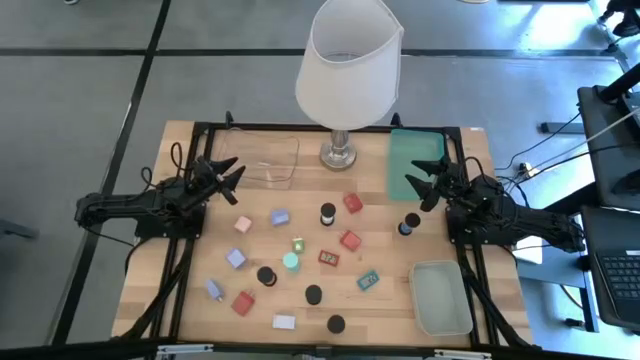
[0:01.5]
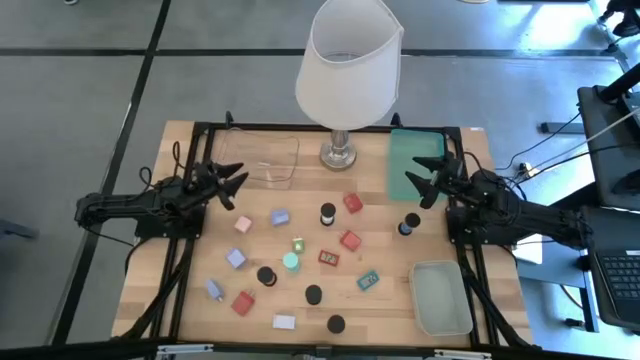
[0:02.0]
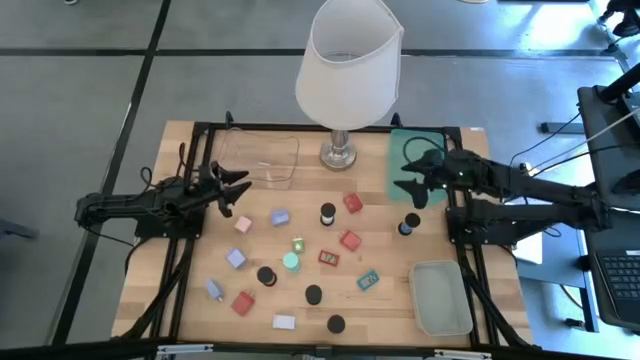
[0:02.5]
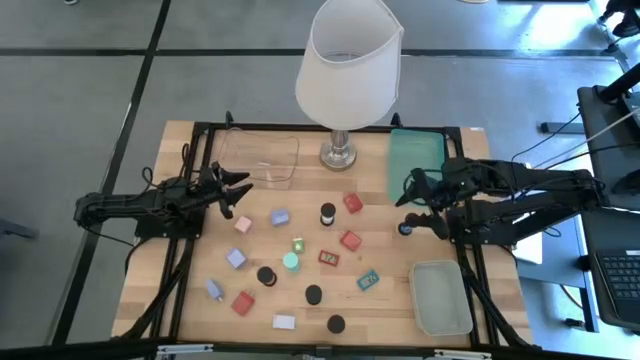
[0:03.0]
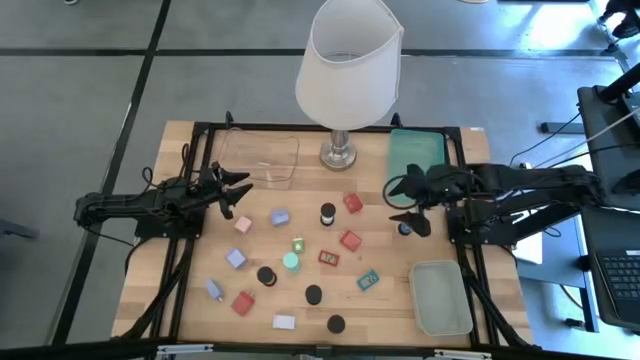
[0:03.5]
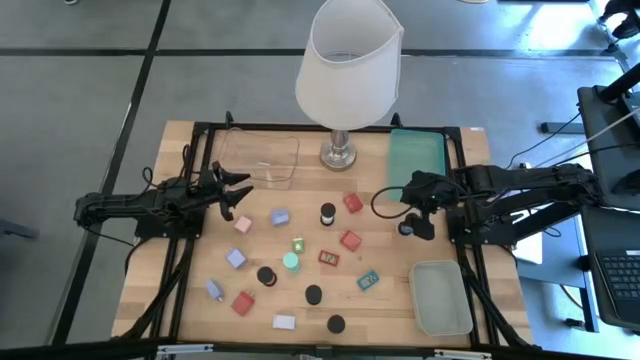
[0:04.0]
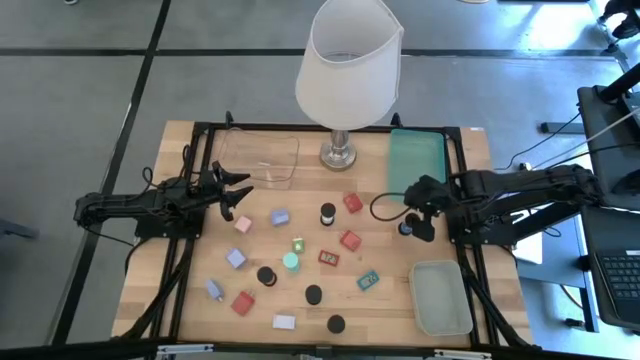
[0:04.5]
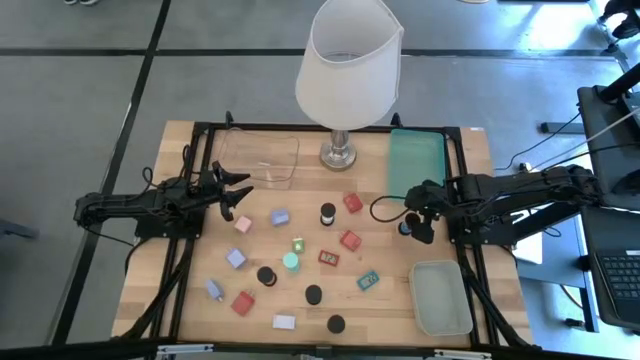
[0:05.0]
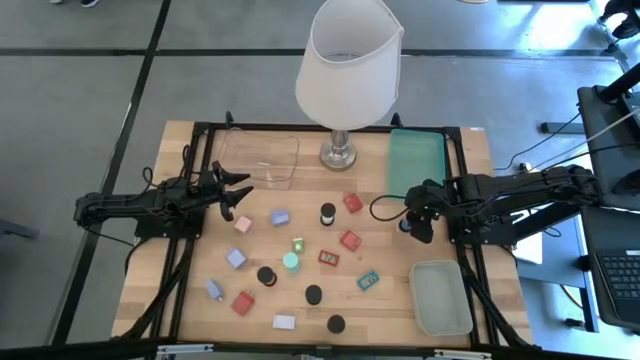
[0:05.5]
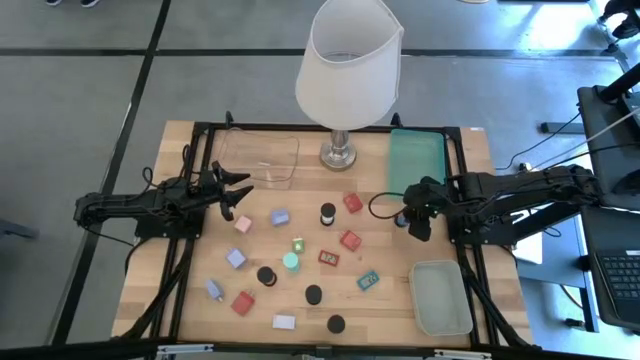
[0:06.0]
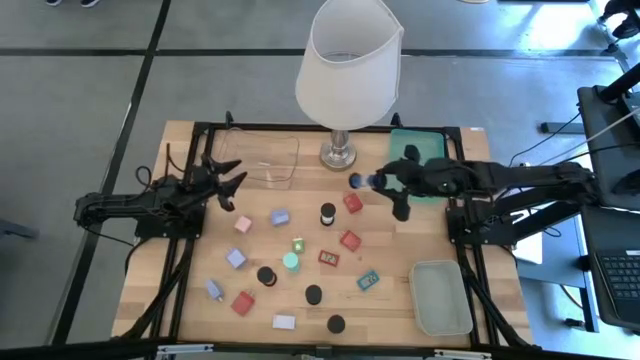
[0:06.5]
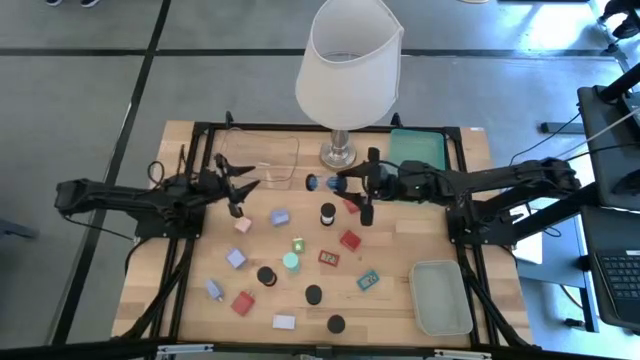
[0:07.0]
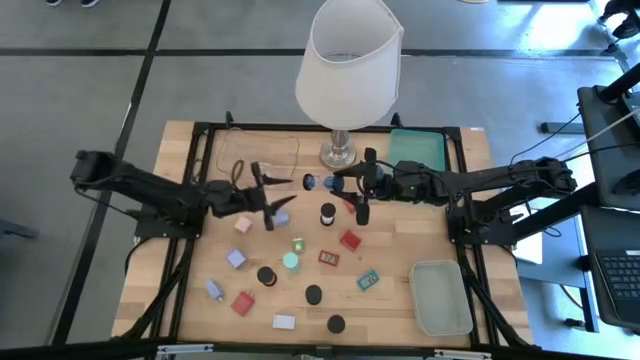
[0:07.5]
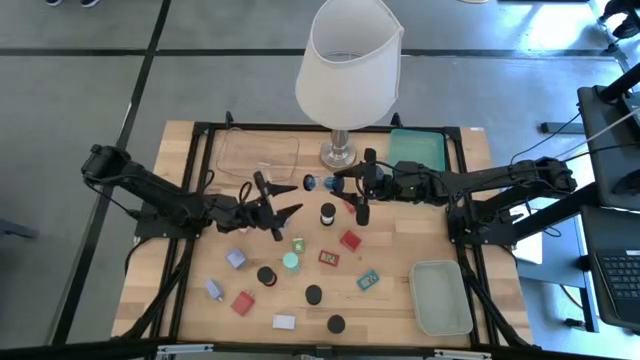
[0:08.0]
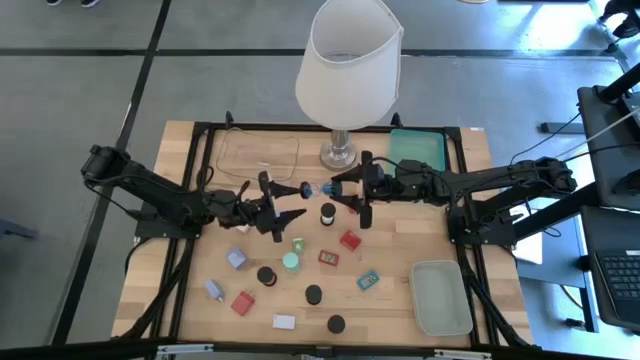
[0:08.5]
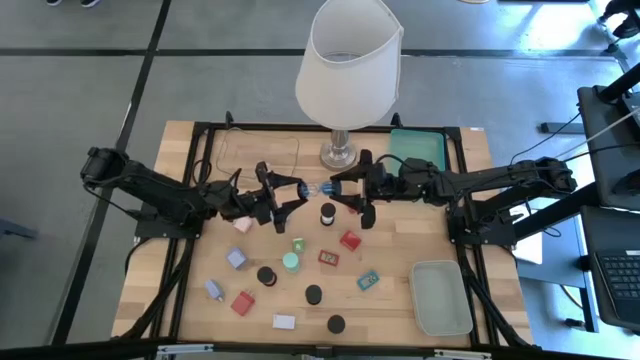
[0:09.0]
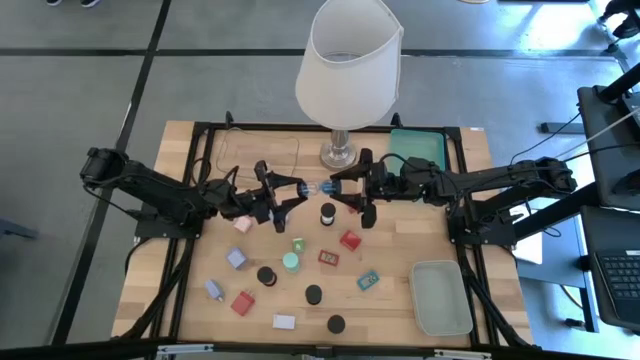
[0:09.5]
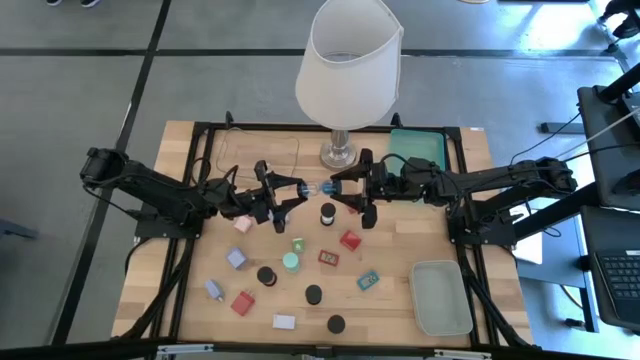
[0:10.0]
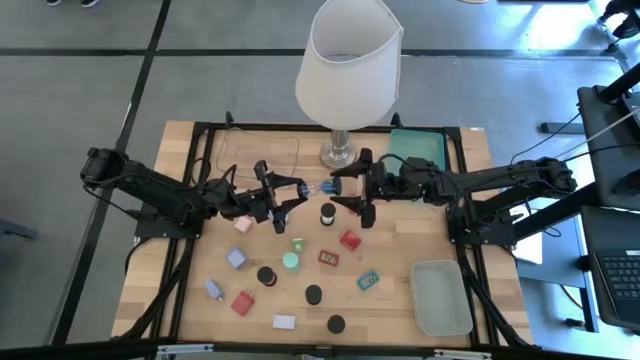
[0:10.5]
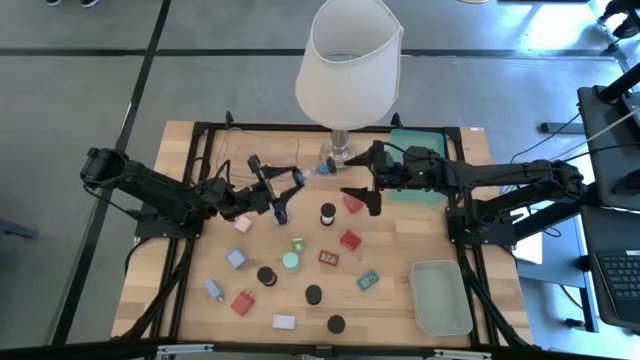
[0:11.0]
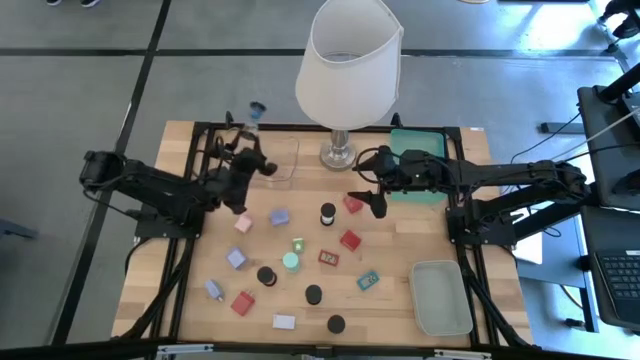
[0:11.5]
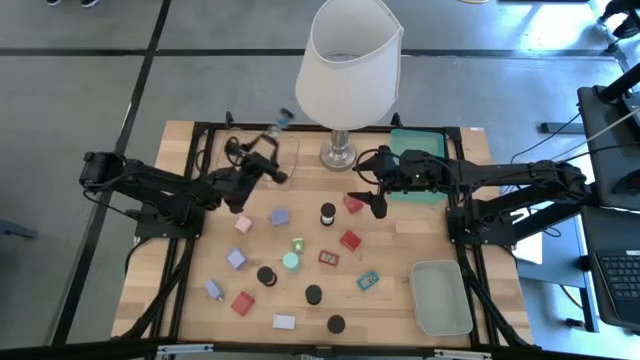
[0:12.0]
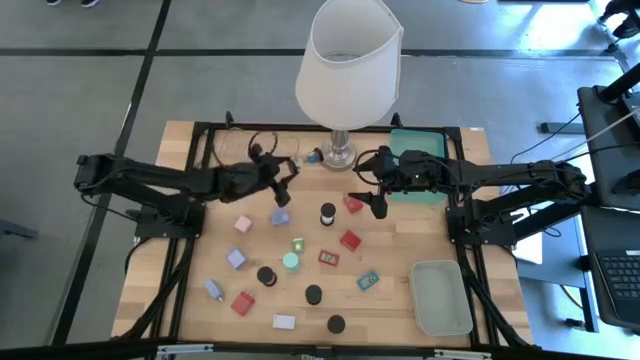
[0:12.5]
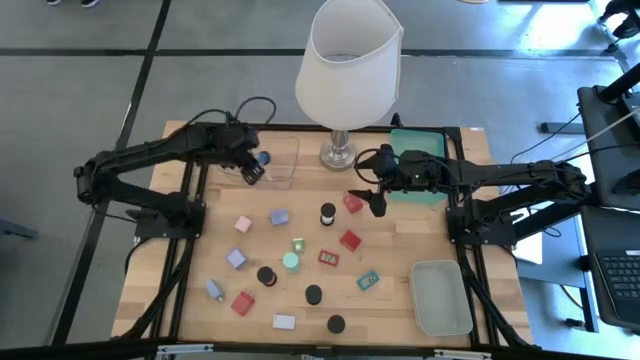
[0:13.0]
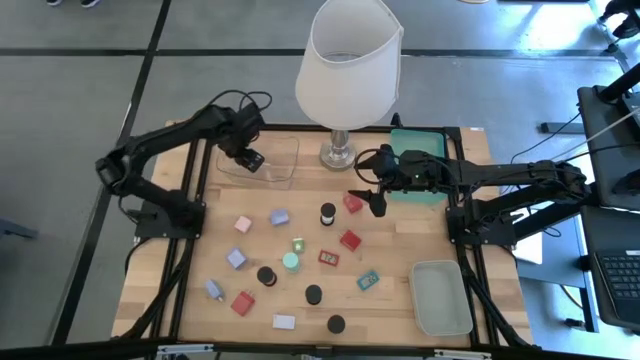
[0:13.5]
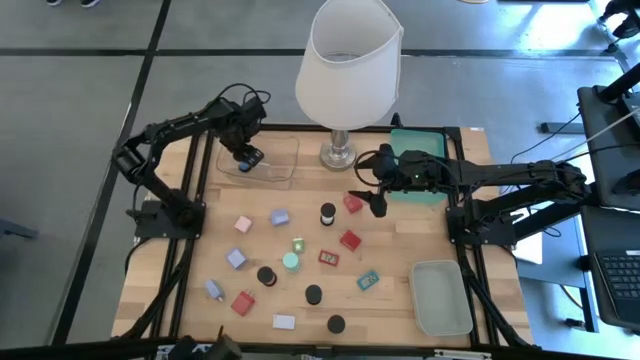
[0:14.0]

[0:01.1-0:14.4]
Task: Pick & Place Office items
Put the blue hourglass into the transparent bin

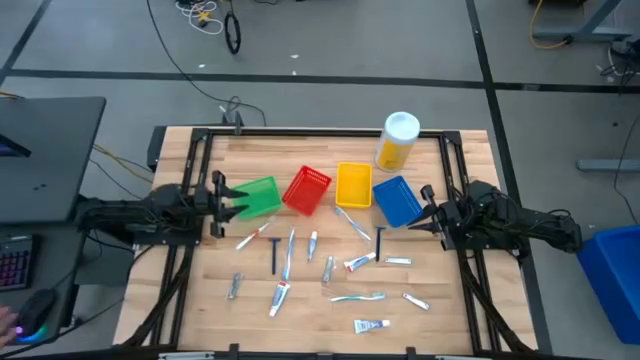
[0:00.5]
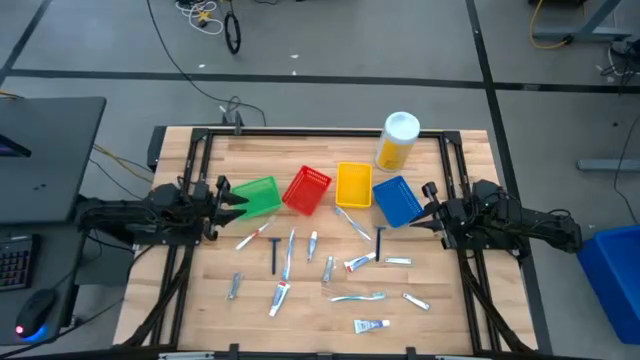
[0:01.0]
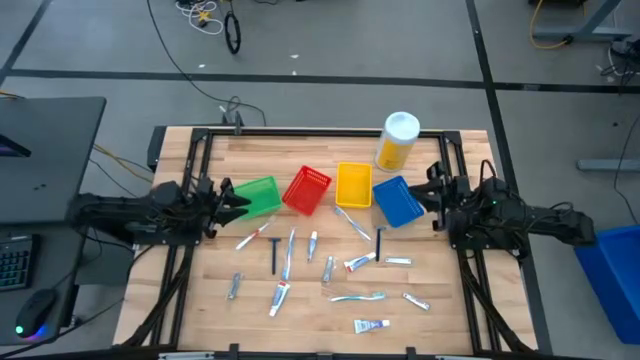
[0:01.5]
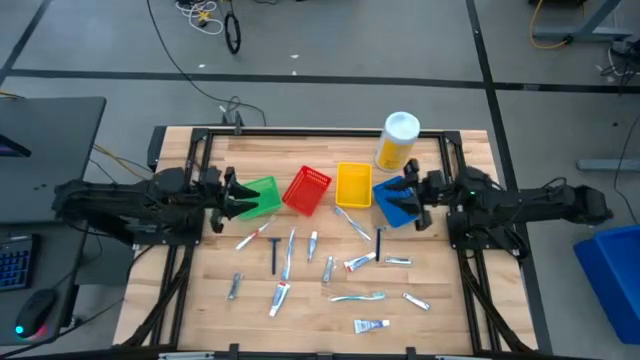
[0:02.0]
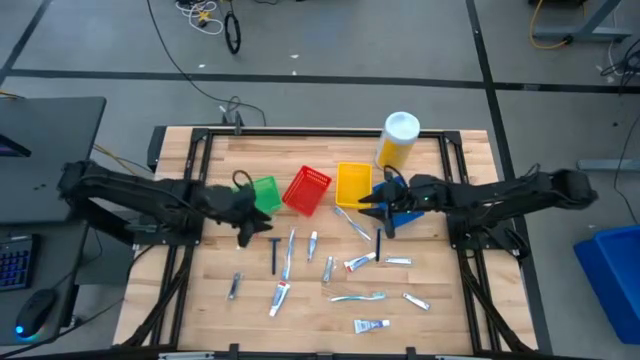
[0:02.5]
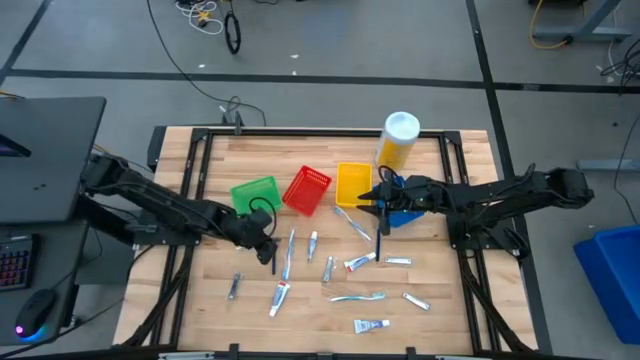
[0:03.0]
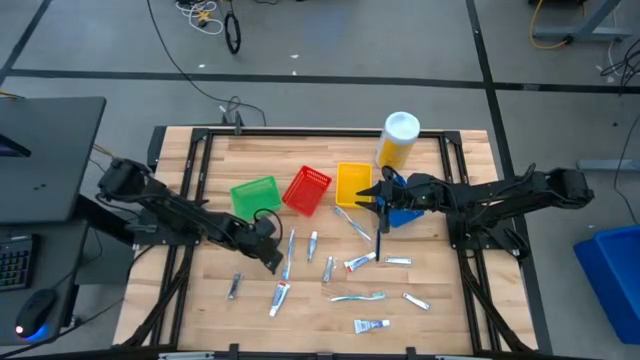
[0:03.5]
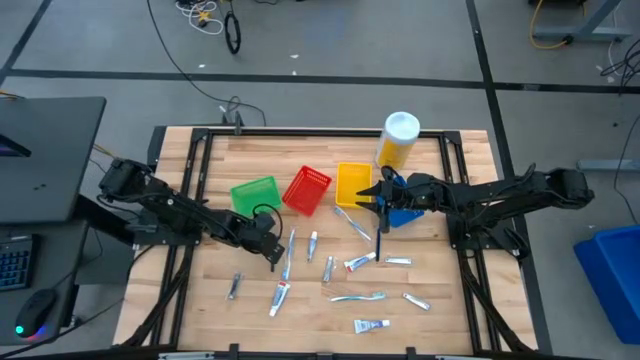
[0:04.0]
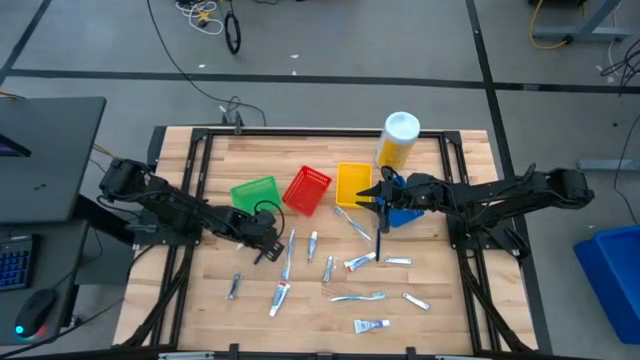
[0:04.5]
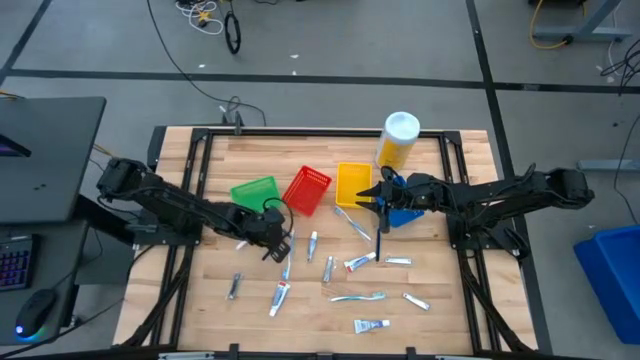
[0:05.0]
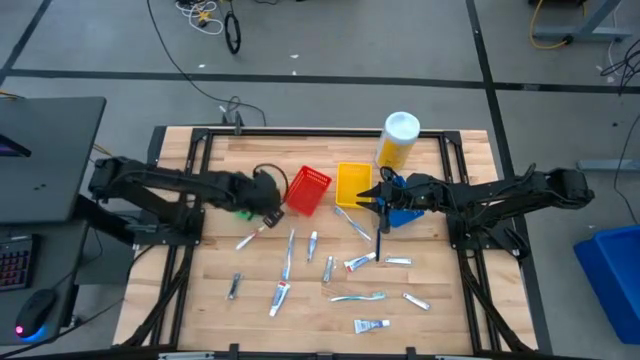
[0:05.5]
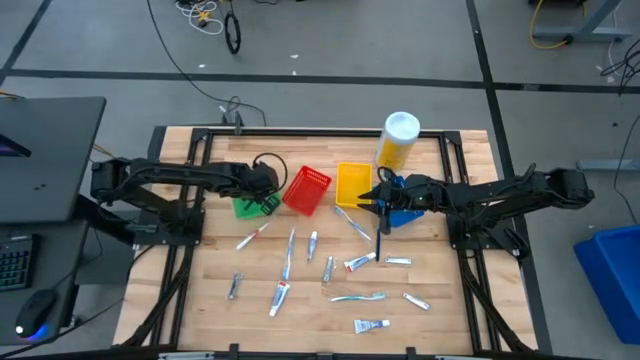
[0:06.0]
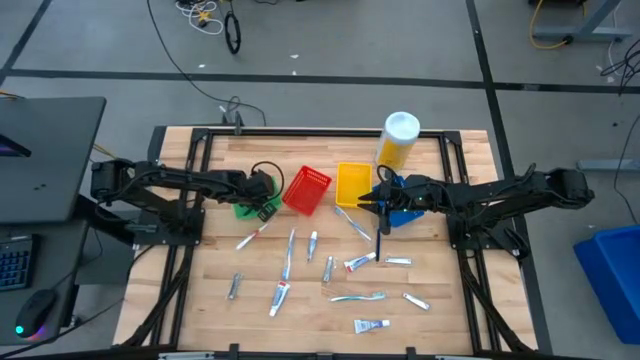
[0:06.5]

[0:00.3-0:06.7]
Task: Pick & Place Travel size toiletries
Put the blue razor into the green bin
